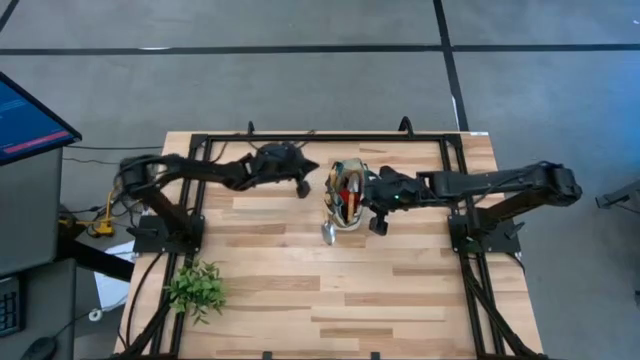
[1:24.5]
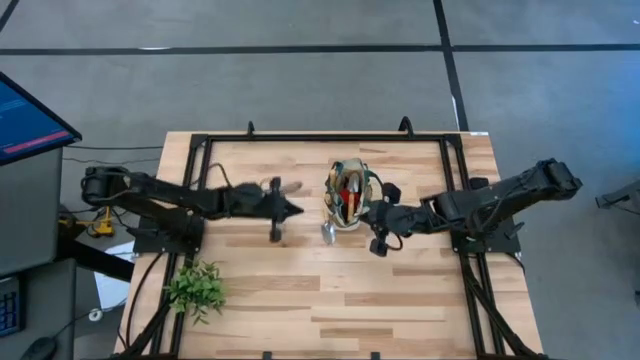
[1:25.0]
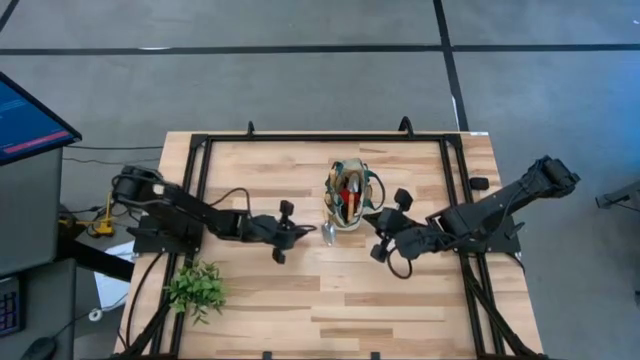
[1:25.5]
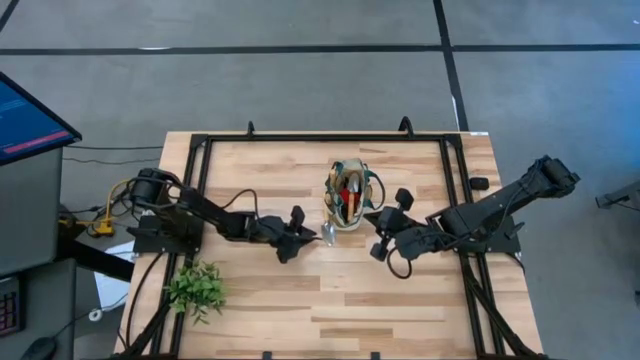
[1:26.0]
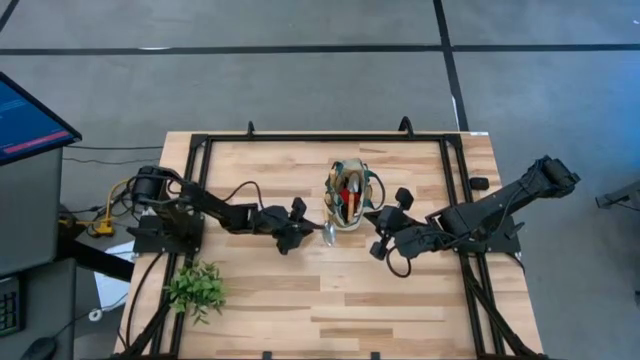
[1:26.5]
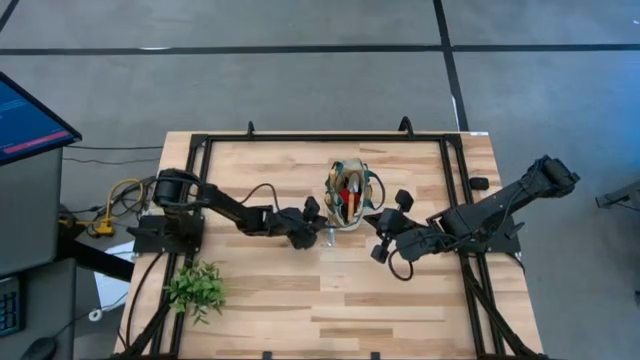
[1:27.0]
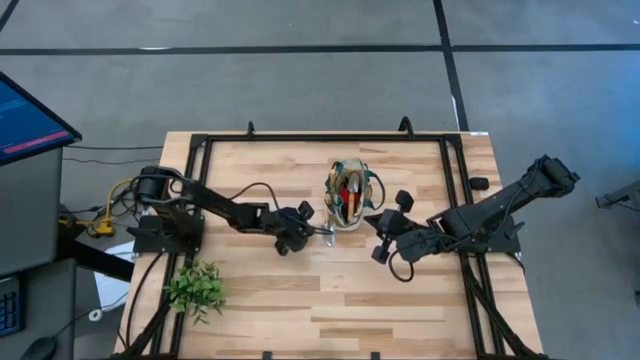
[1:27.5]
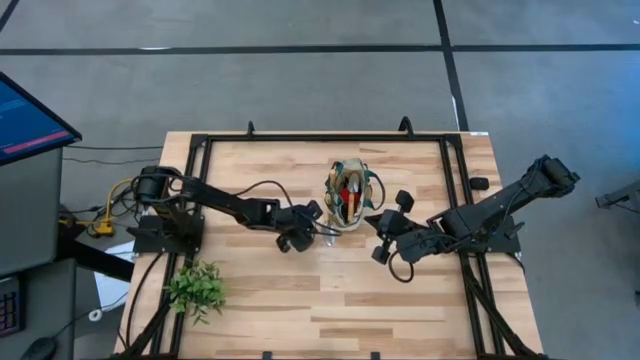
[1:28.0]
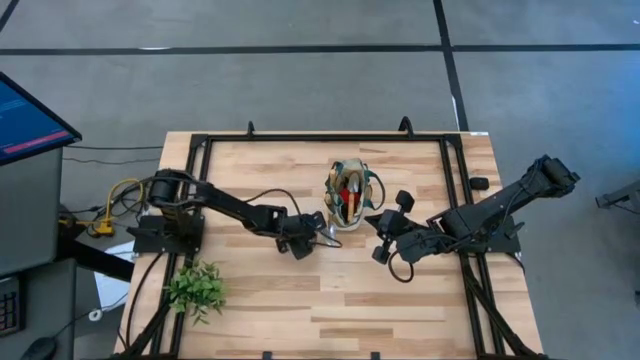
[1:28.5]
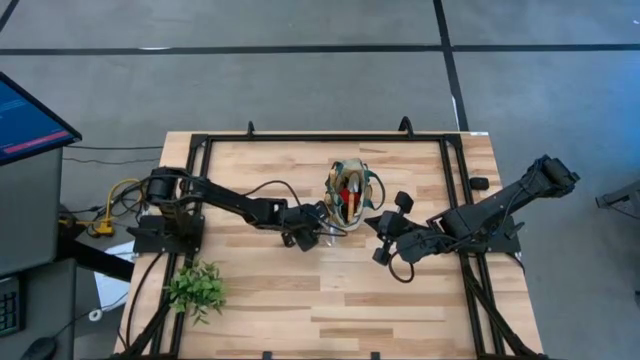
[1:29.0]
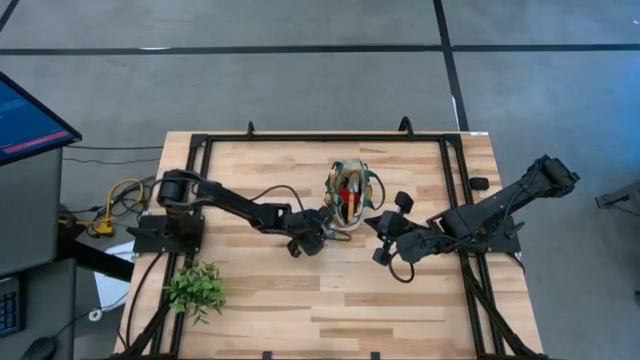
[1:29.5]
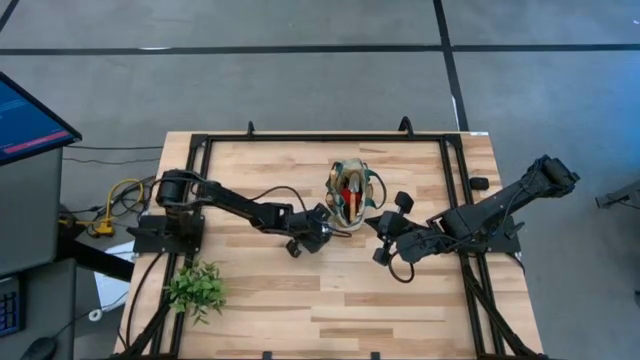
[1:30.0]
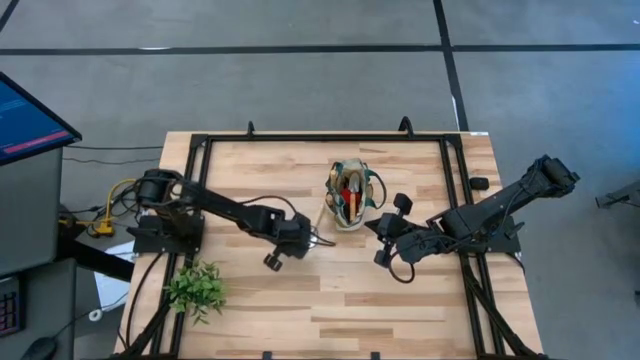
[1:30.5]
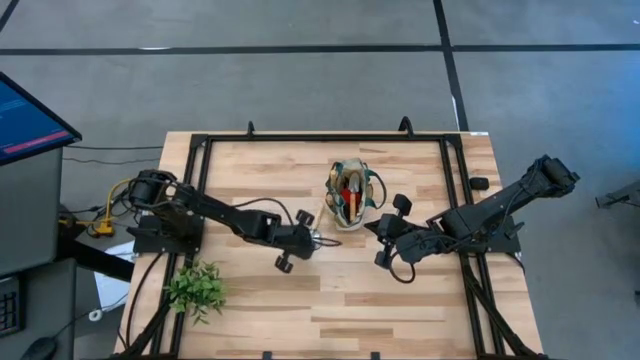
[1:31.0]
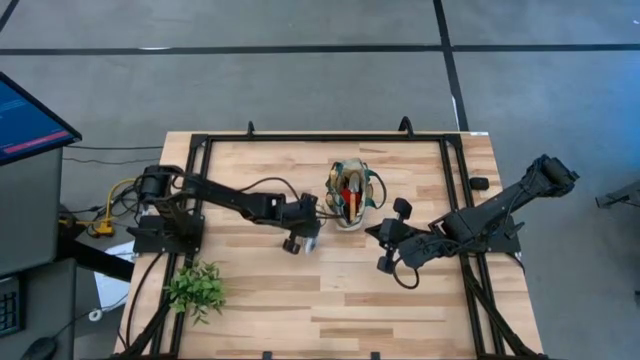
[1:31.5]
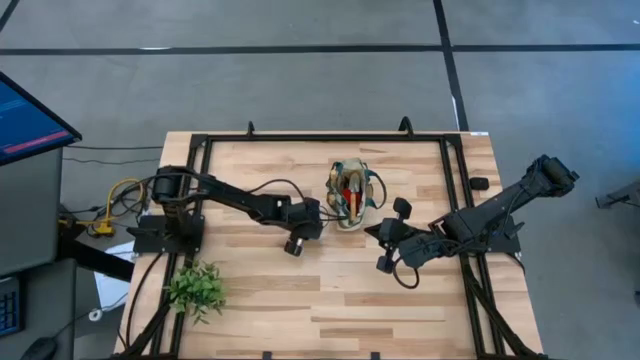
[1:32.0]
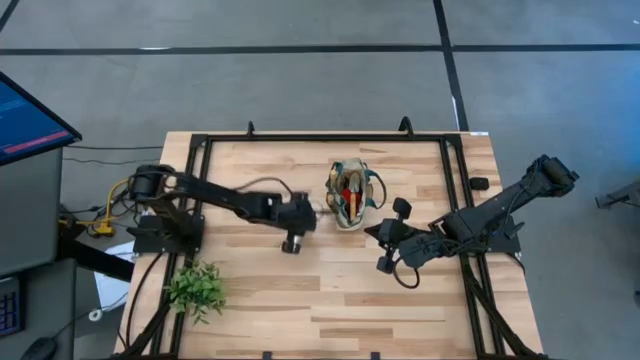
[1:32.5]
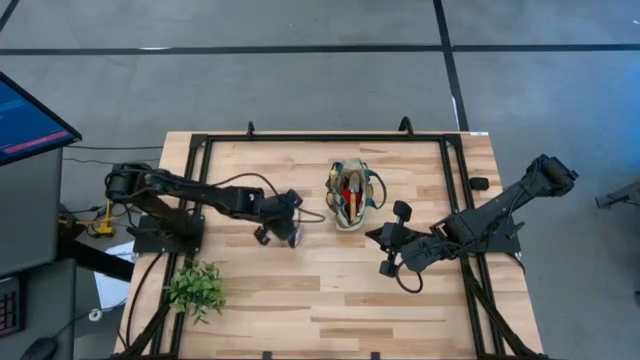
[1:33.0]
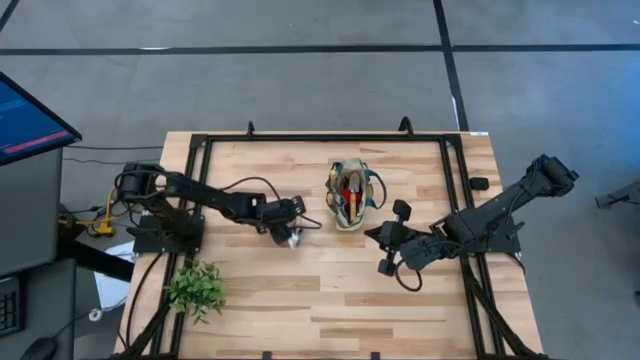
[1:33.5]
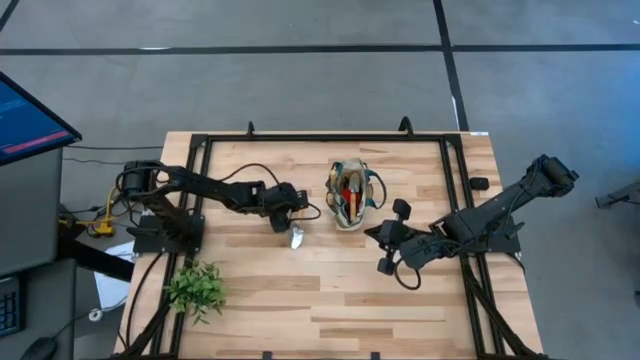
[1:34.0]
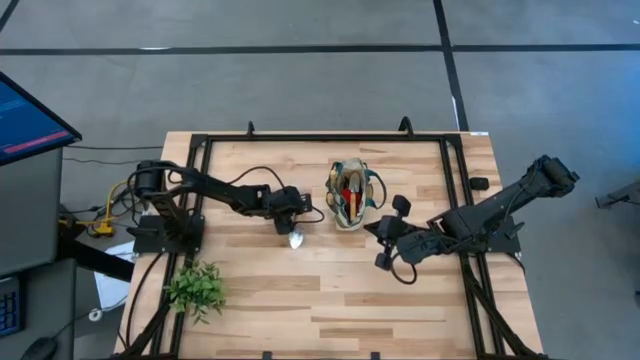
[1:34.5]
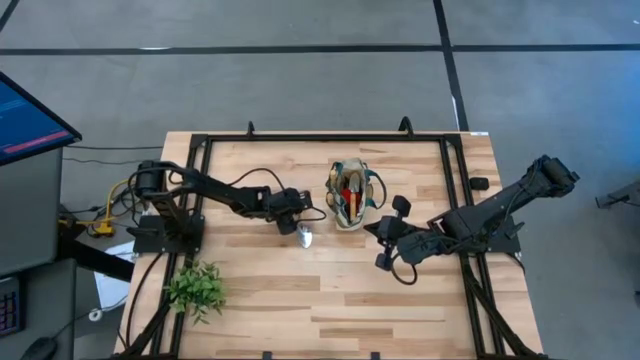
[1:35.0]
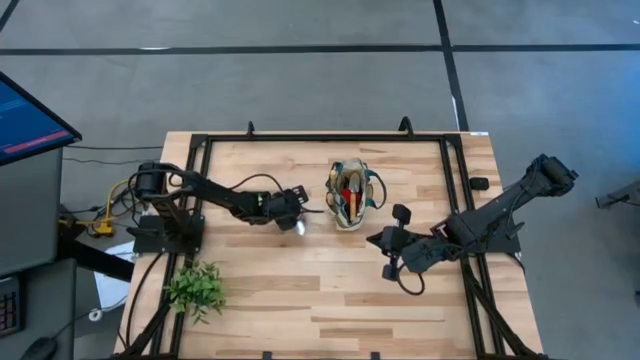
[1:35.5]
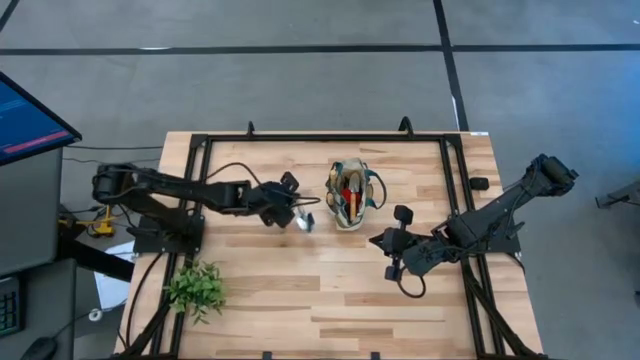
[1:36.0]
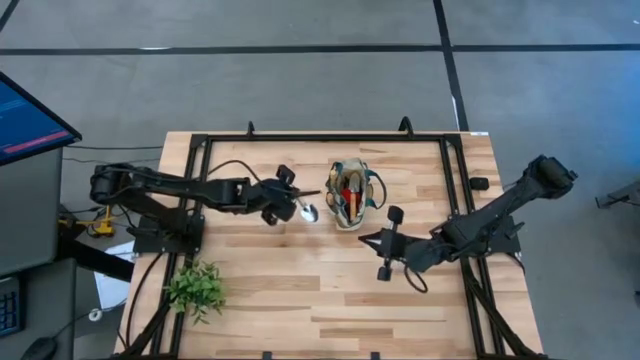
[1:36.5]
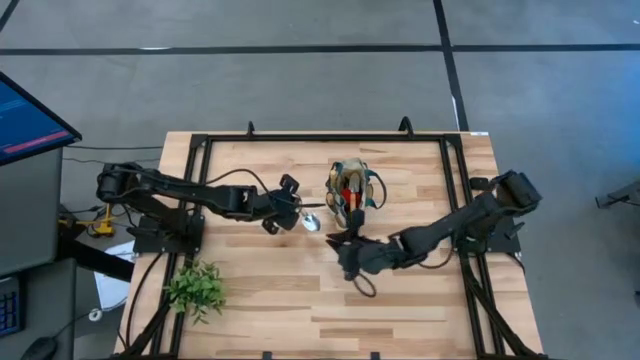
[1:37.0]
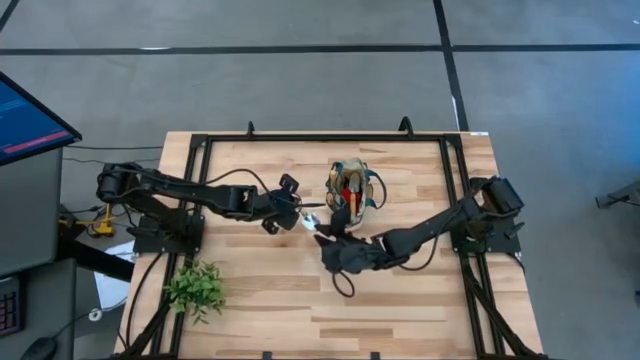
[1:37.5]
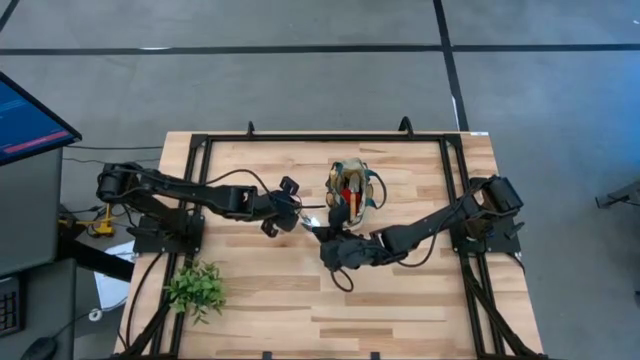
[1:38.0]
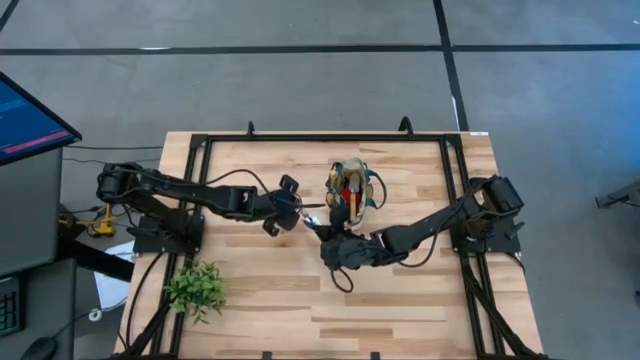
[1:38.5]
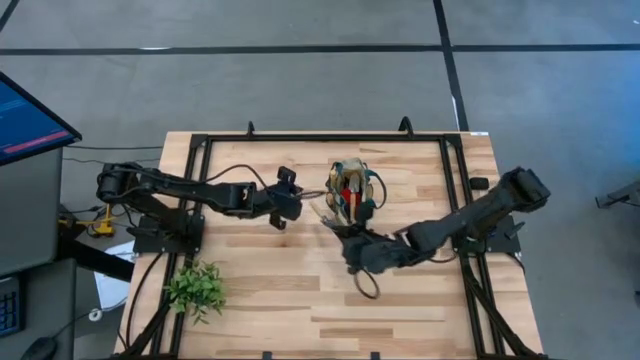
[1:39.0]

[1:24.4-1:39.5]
Task: Pick & Place Garden tools in Gardening bag
Put the brown trowel into the gardening bag

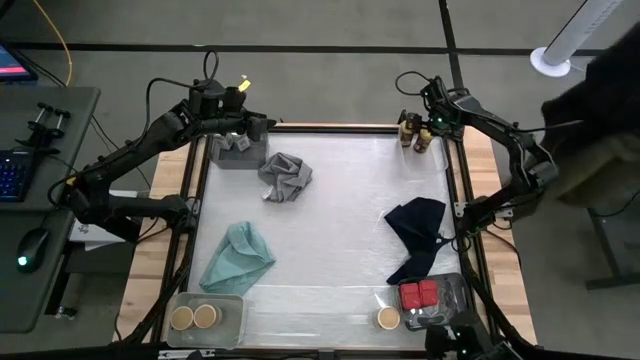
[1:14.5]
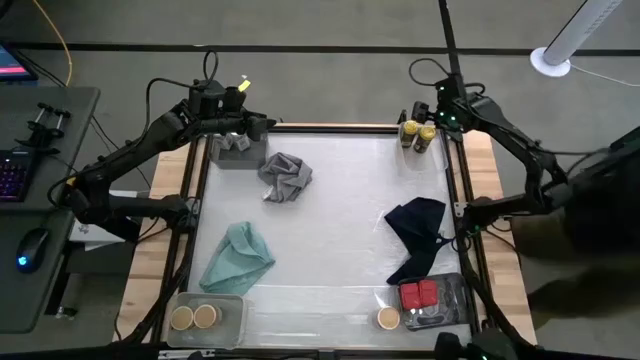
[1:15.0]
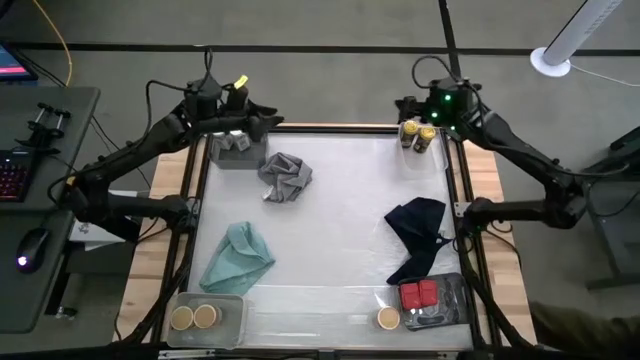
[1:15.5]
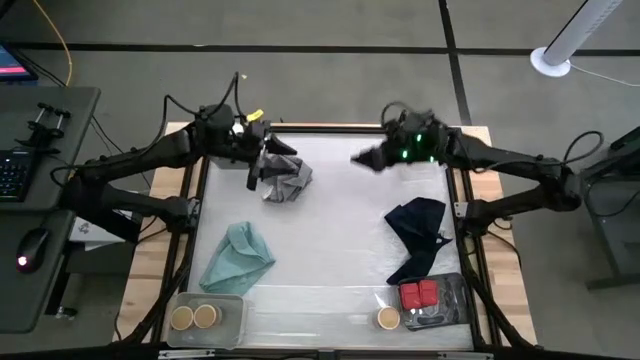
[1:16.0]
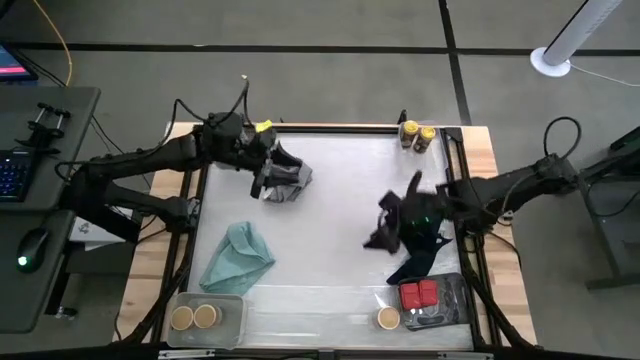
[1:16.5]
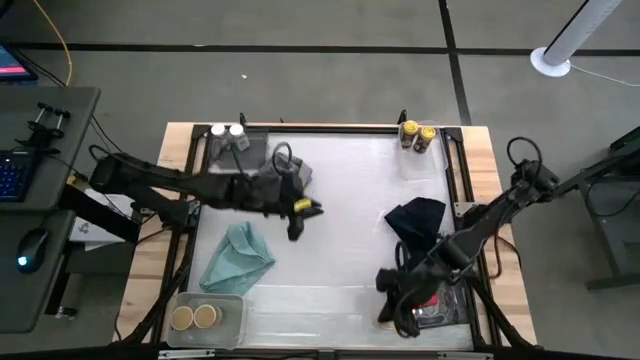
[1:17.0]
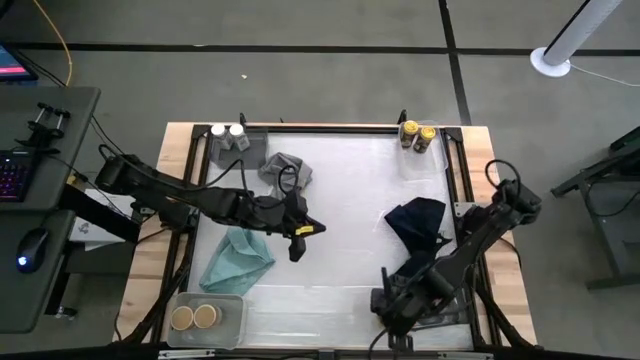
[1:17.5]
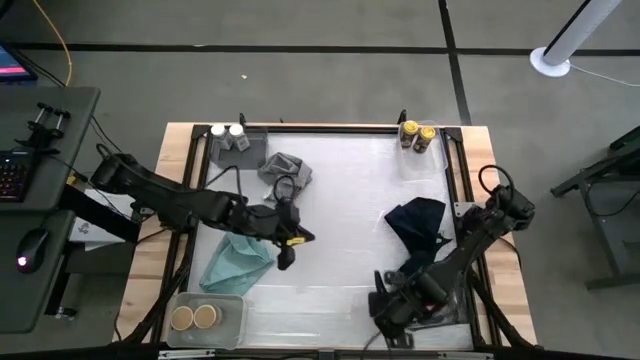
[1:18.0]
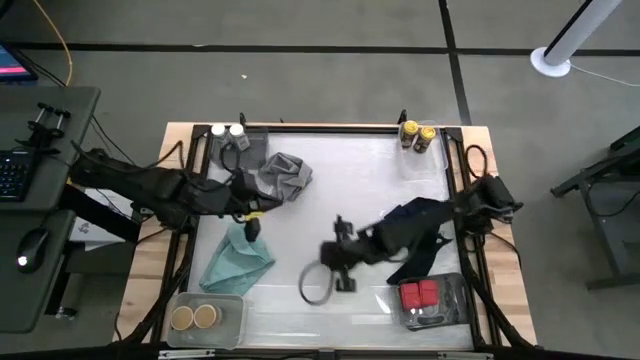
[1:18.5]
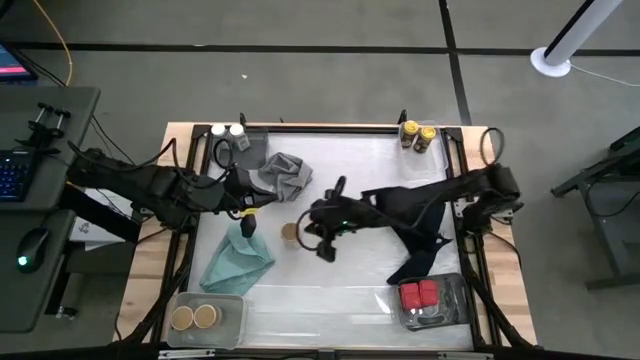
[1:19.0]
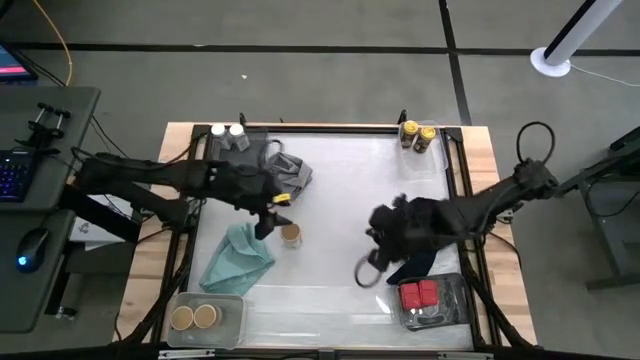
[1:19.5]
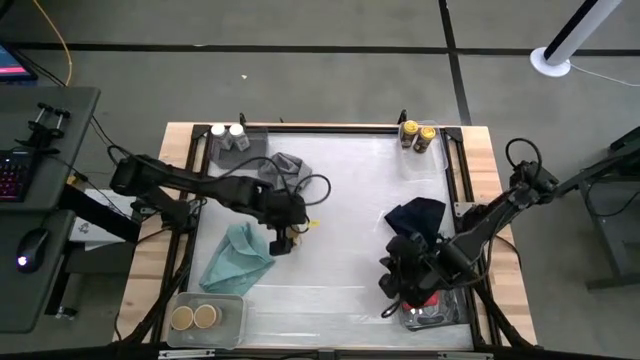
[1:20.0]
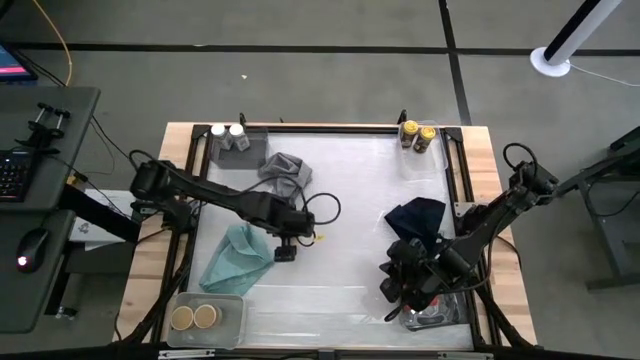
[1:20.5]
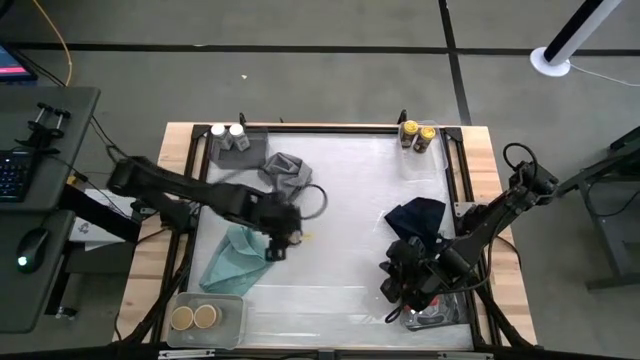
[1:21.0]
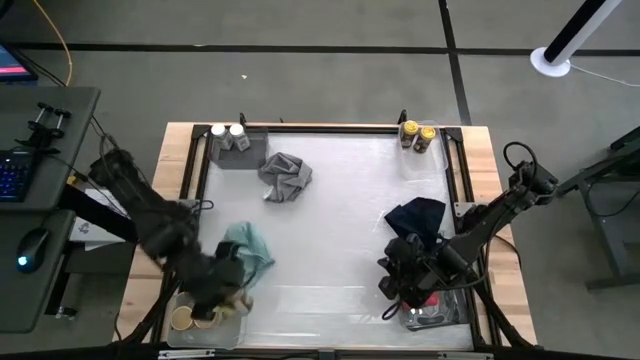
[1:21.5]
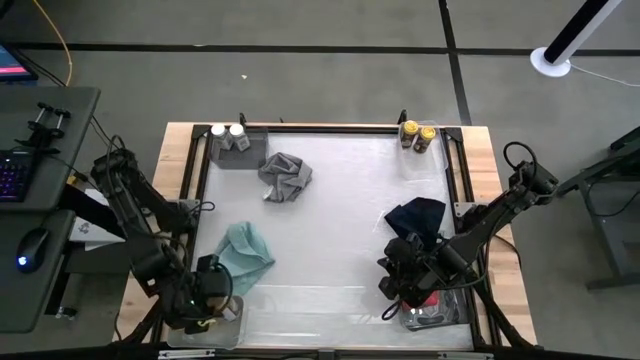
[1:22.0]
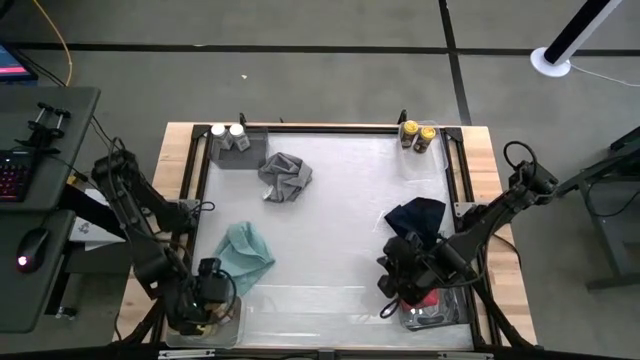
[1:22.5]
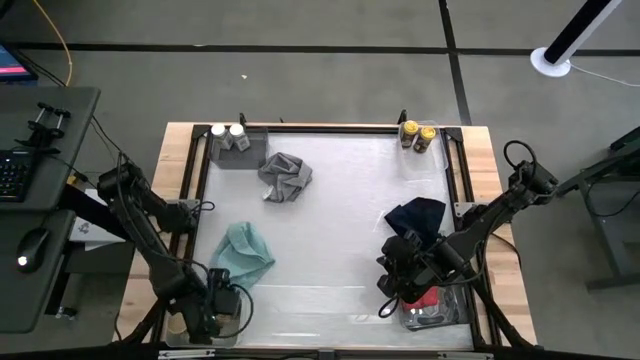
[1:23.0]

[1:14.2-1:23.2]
Task: Sort spices by type
Put the brown seasoning bottle into the gray bin
